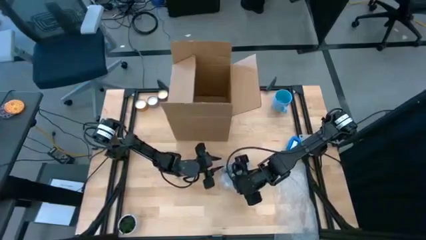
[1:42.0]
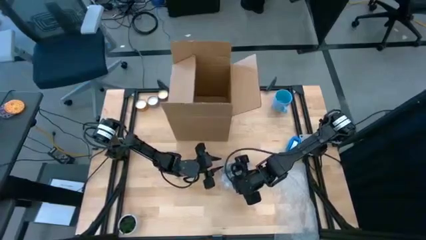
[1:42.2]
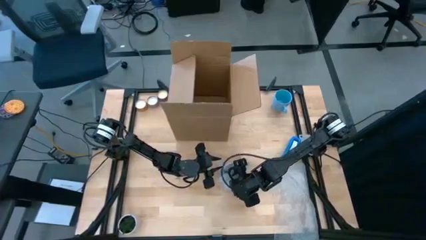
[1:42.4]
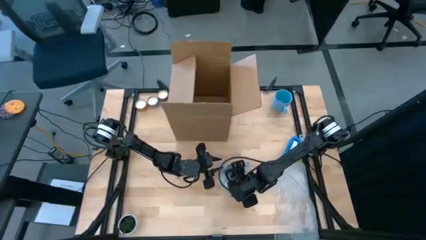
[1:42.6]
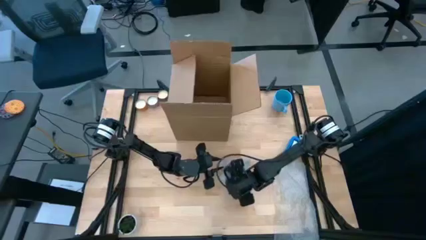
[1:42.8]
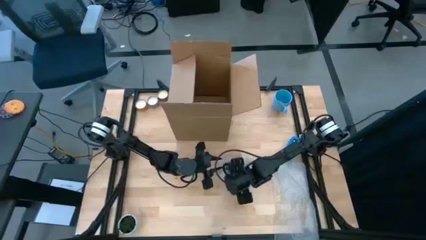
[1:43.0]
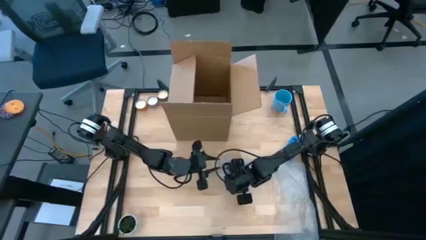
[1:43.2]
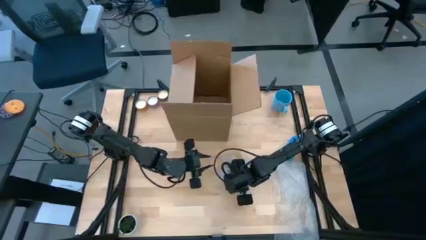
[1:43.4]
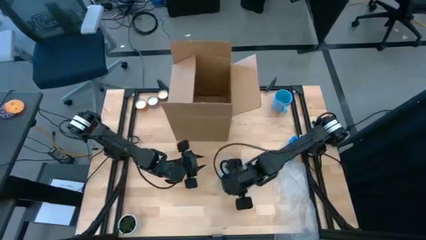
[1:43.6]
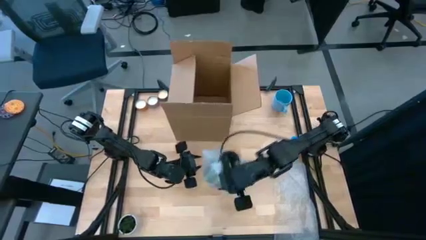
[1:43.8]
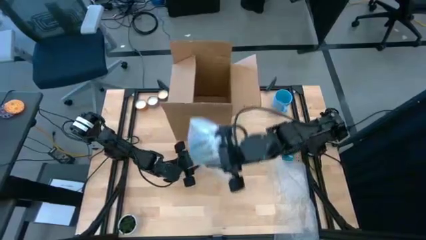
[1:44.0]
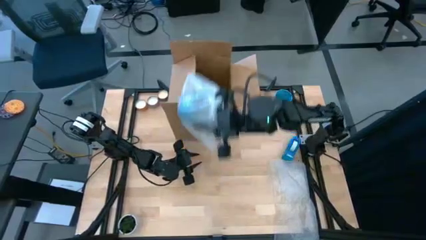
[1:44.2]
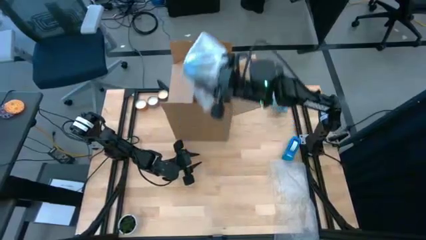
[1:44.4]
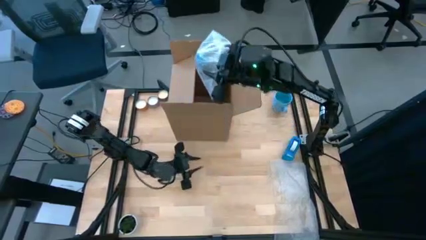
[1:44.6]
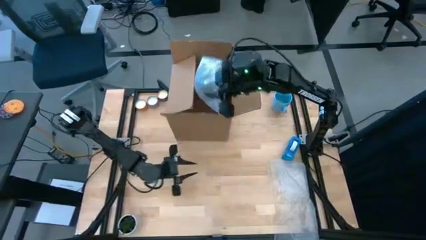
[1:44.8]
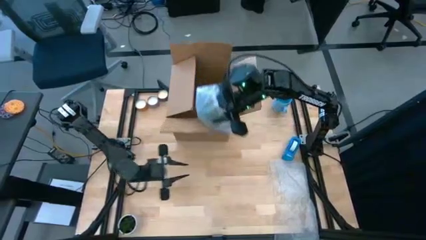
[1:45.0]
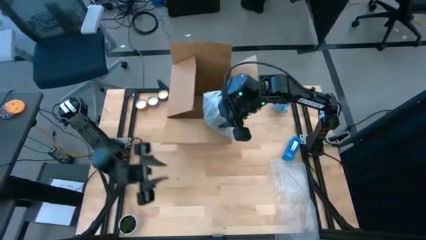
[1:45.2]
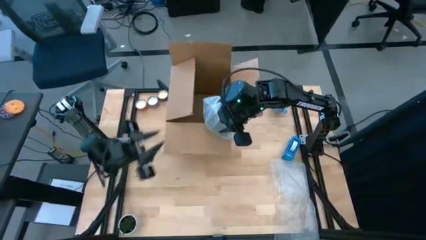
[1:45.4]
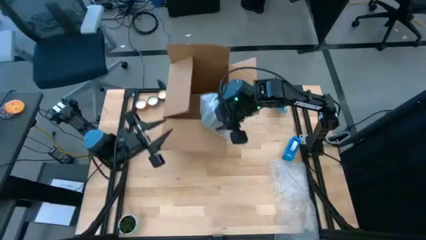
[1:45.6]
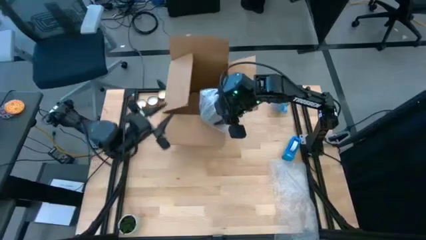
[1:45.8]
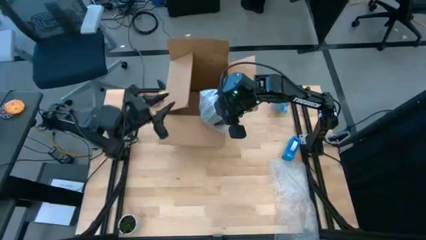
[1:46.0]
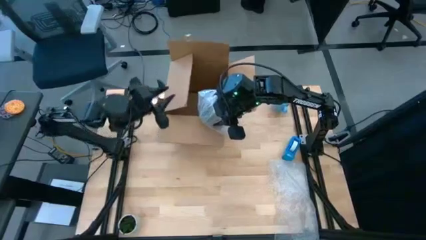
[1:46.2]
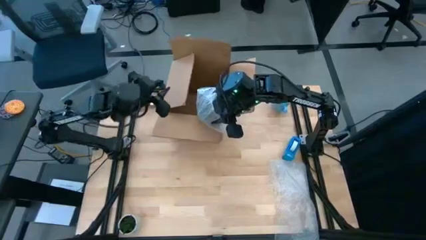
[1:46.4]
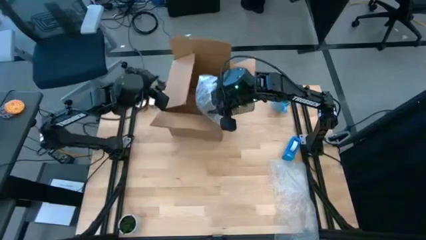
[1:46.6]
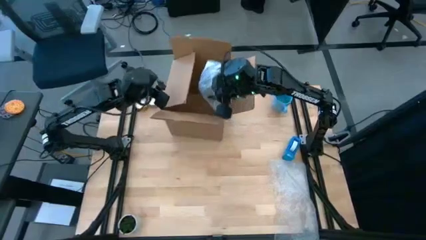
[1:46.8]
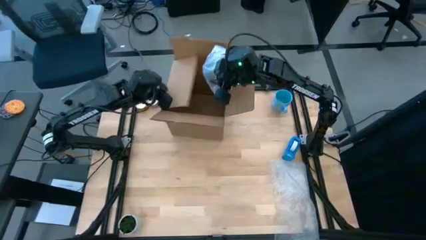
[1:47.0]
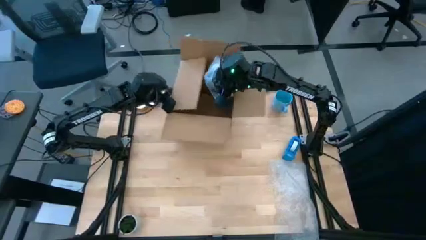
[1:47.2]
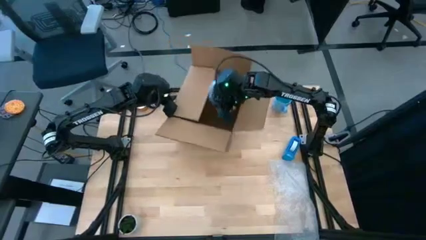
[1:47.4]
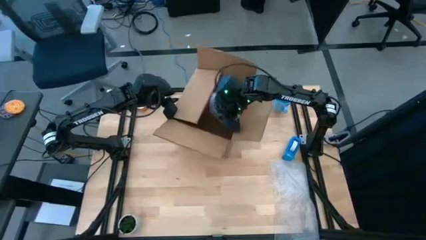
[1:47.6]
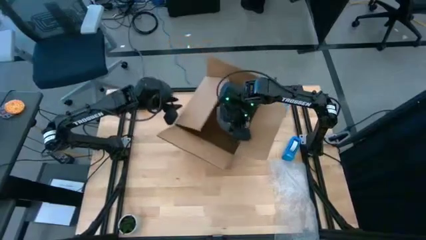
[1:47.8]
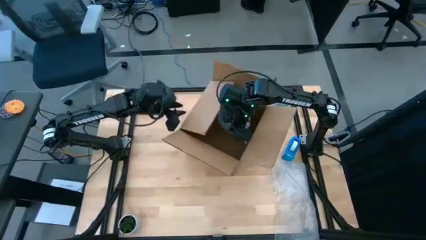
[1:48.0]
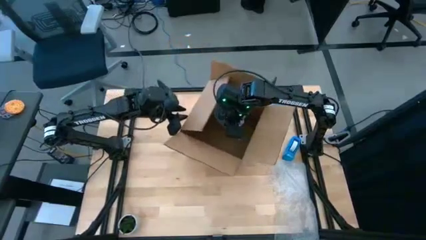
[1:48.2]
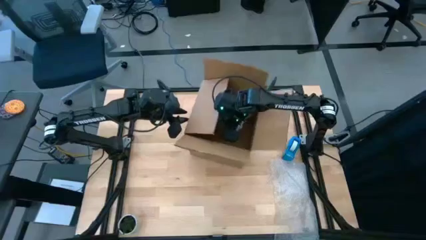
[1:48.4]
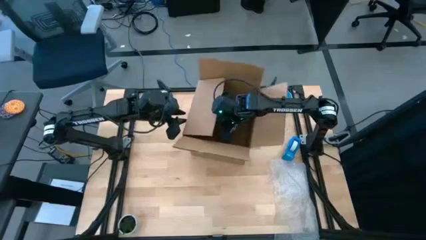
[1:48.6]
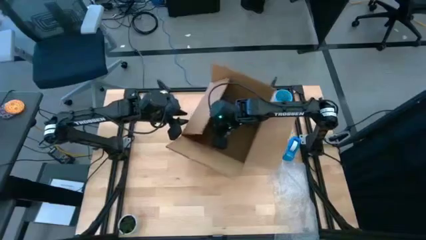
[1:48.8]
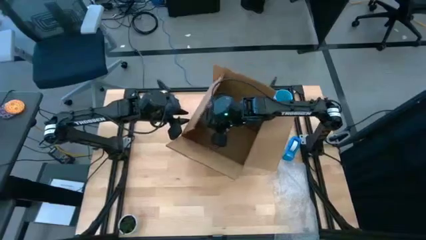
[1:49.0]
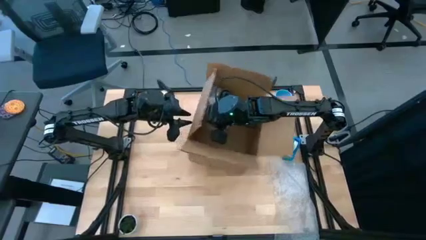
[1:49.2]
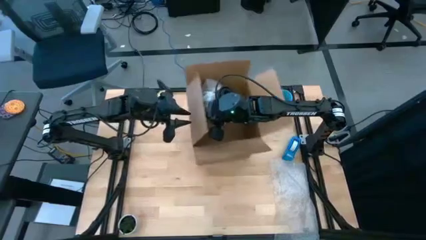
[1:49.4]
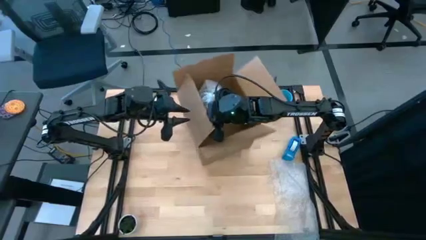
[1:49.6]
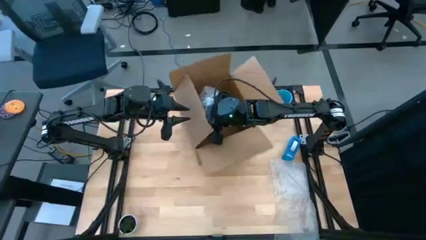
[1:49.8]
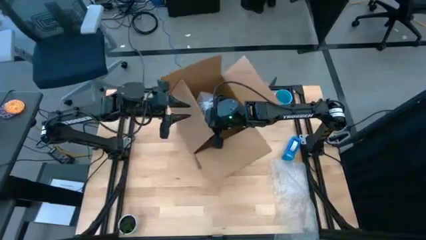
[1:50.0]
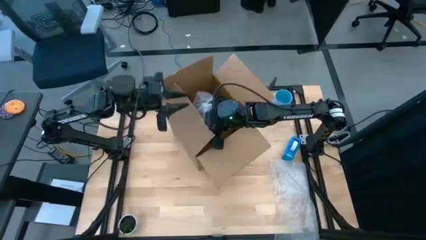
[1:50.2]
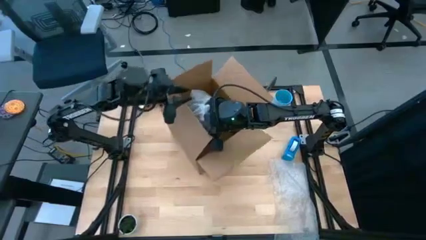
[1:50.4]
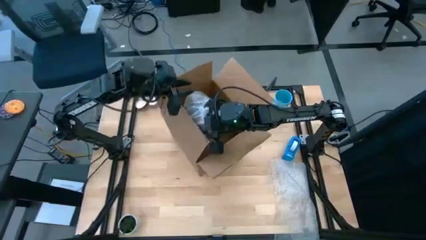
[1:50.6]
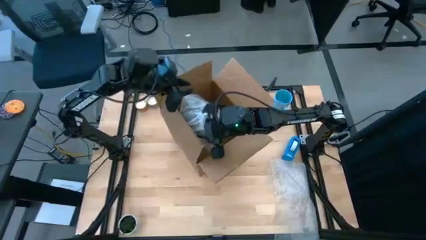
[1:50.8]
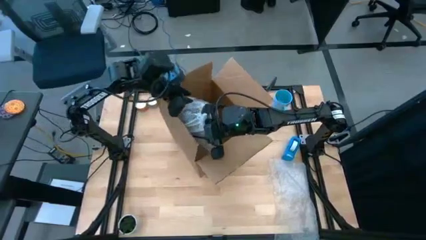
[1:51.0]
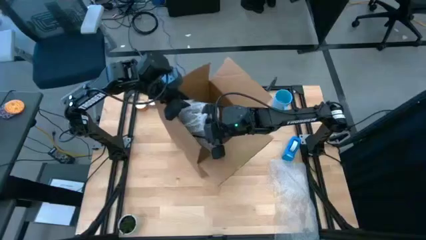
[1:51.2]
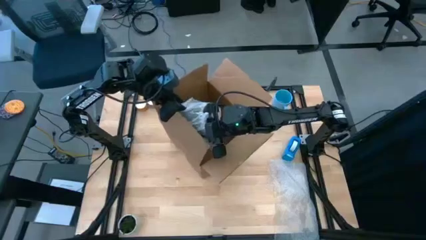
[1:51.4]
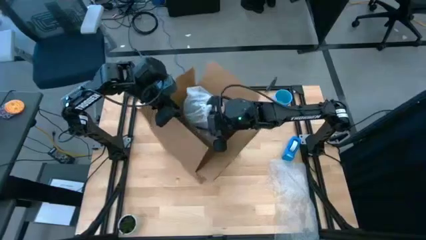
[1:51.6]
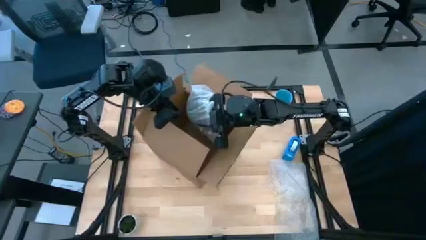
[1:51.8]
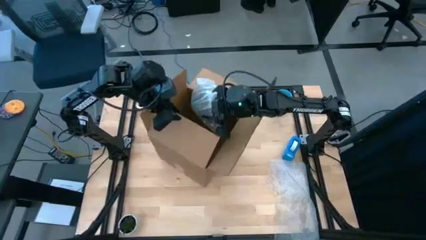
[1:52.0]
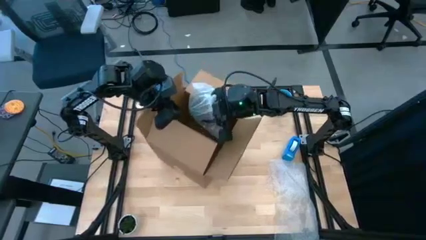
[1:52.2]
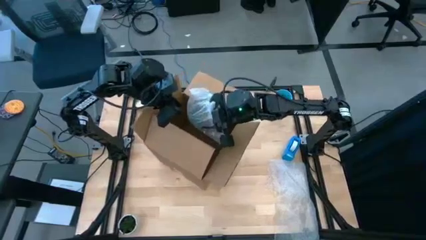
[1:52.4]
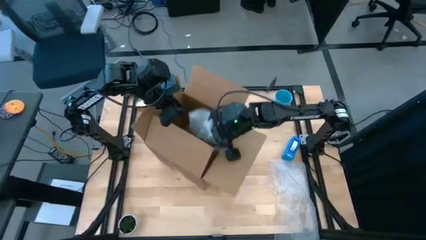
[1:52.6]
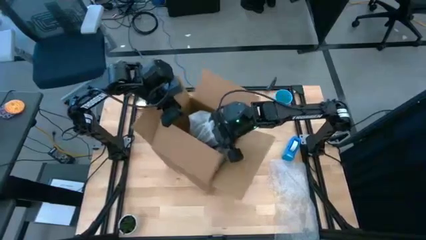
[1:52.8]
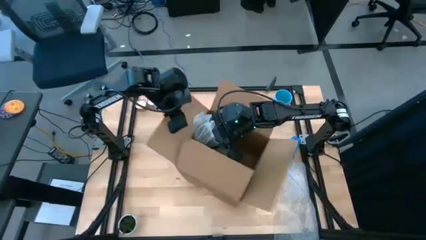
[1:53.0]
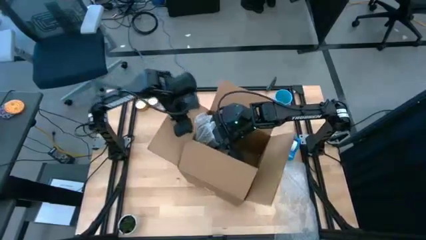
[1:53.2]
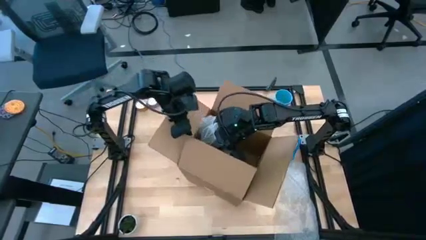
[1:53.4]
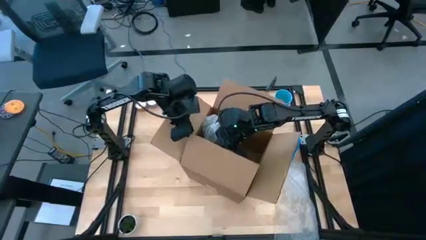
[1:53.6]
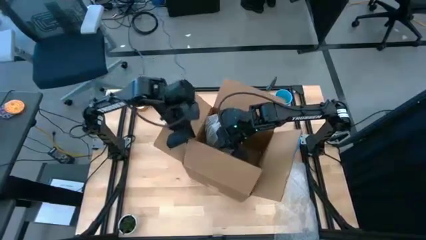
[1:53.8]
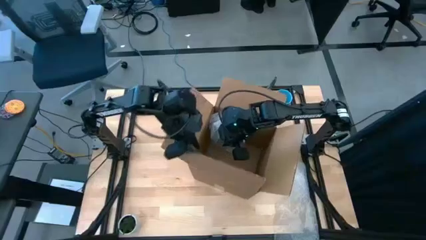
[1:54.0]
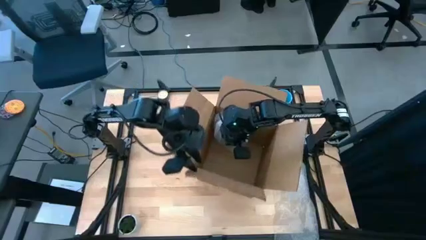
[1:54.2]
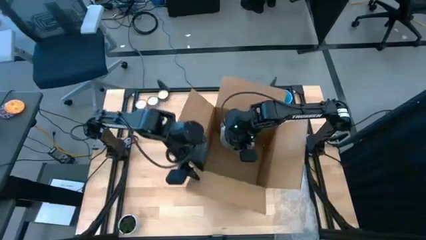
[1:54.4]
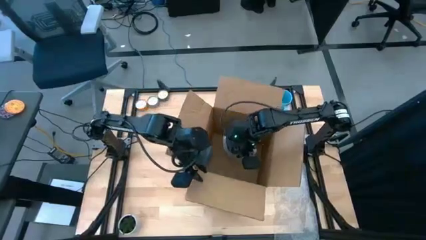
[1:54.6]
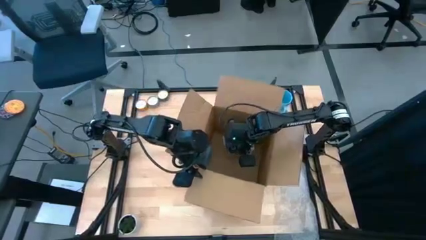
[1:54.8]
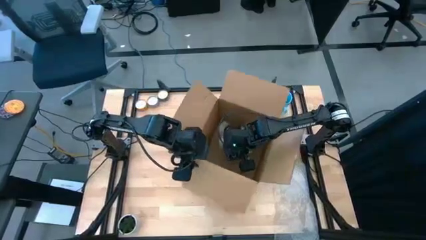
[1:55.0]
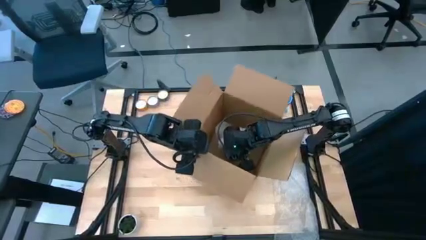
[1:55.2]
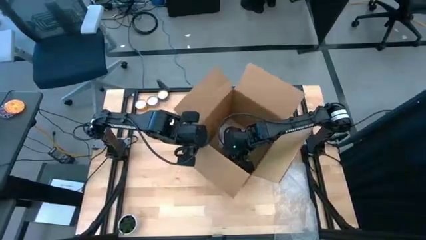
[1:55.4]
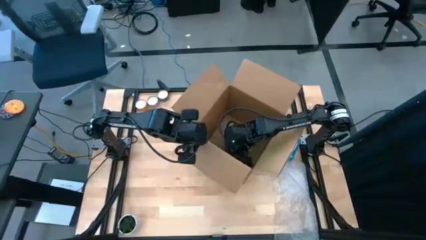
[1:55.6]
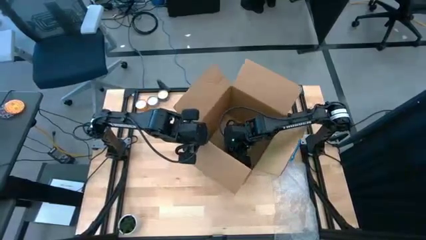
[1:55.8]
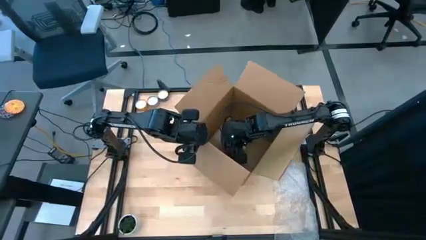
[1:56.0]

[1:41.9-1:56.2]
Task: wrap mug
Put the wrapped brown cup into the cardboard box

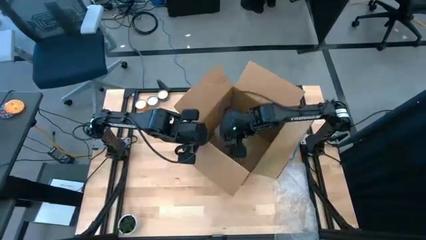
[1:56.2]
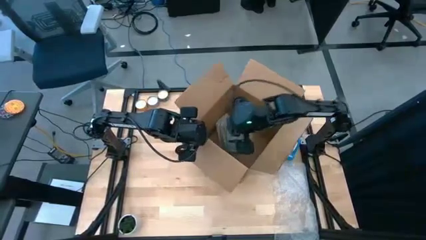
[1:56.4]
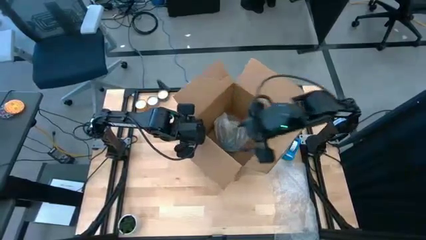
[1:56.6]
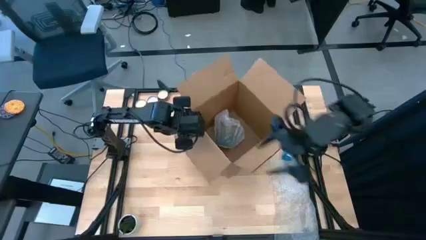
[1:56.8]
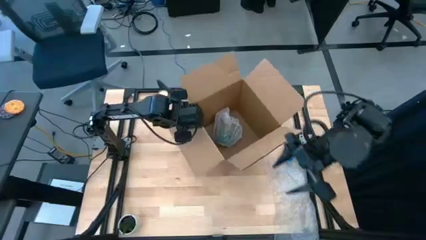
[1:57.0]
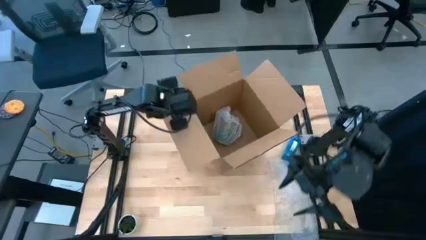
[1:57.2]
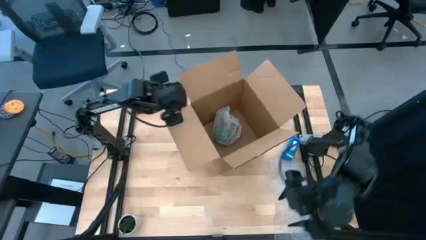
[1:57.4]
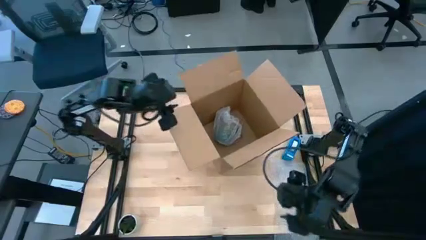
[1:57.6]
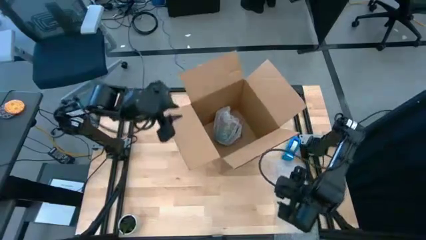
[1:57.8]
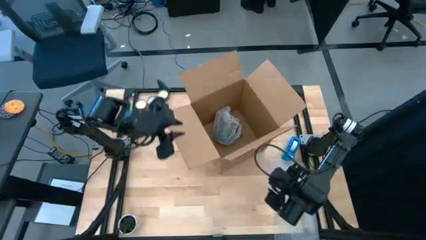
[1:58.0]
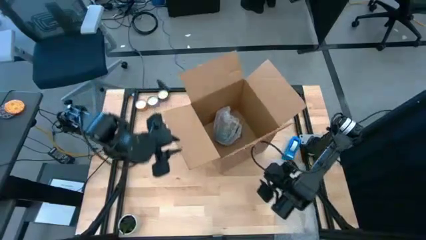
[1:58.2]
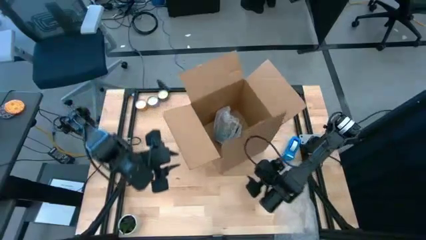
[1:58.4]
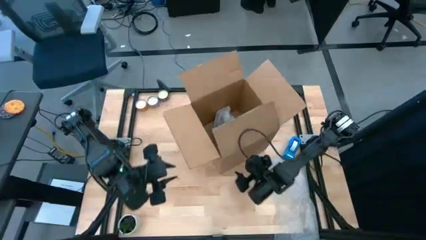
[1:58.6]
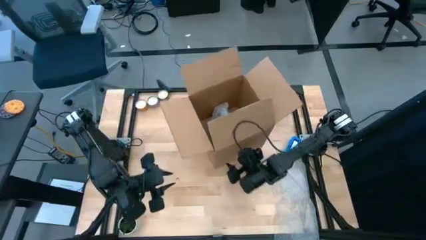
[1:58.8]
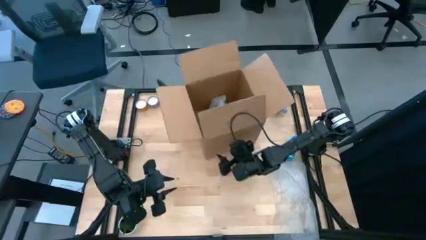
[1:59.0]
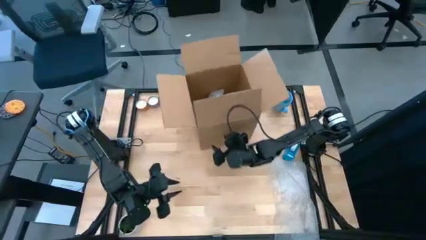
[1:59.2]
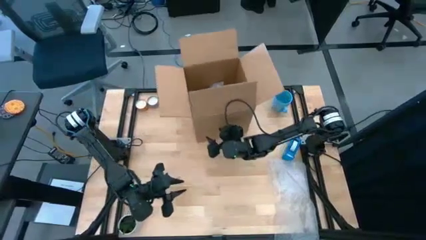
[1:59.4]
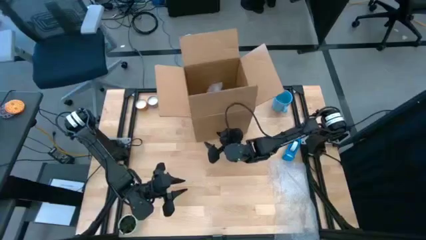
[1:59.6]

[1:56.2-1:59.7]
Move the cardboard box to the upper middle of the table
